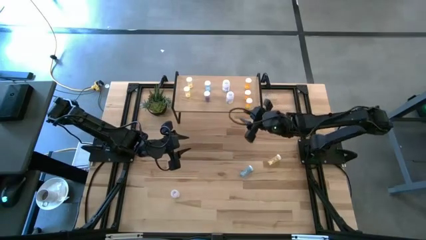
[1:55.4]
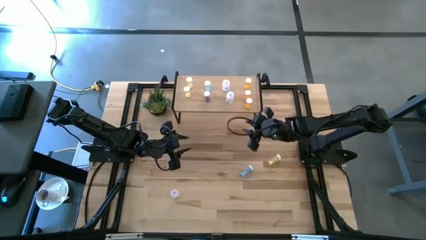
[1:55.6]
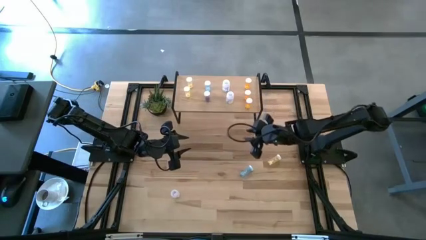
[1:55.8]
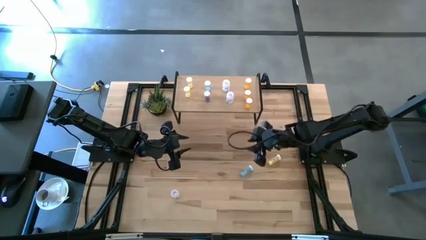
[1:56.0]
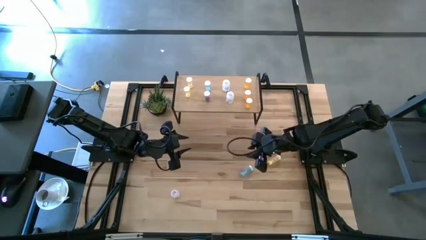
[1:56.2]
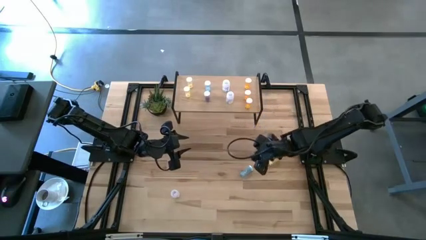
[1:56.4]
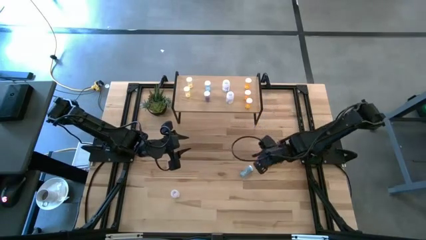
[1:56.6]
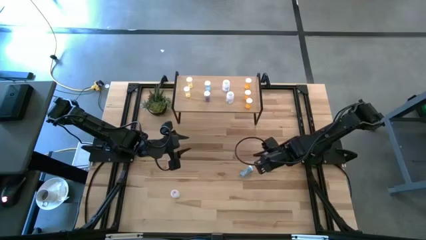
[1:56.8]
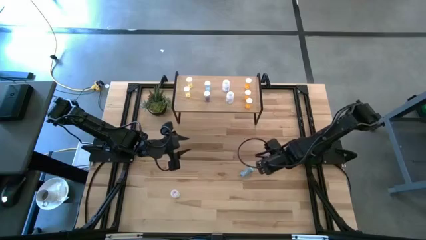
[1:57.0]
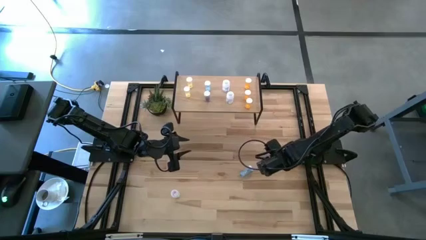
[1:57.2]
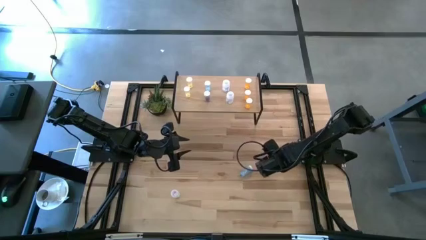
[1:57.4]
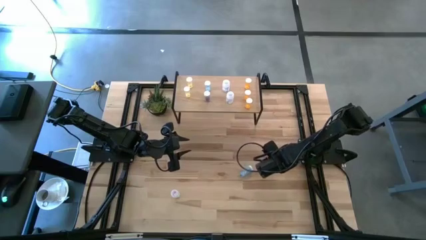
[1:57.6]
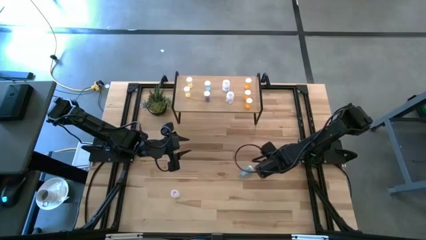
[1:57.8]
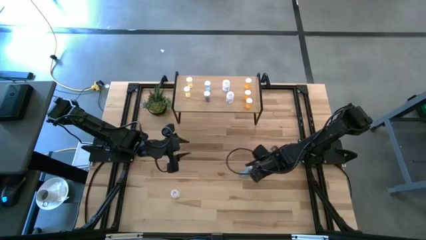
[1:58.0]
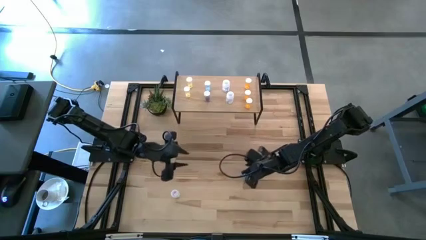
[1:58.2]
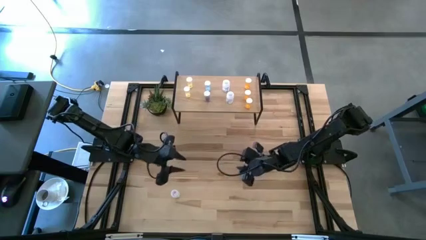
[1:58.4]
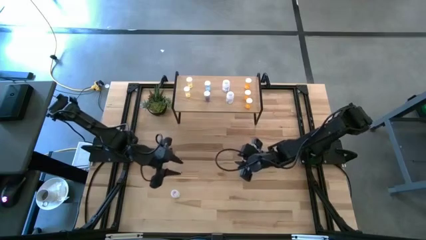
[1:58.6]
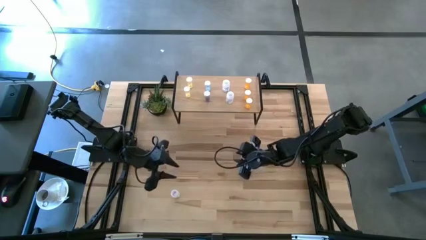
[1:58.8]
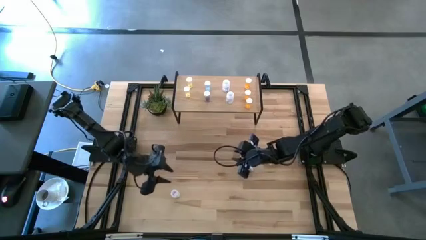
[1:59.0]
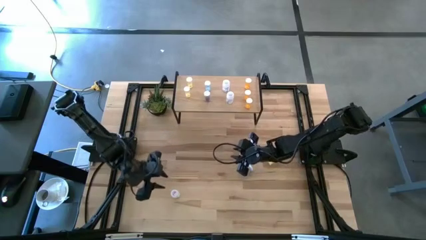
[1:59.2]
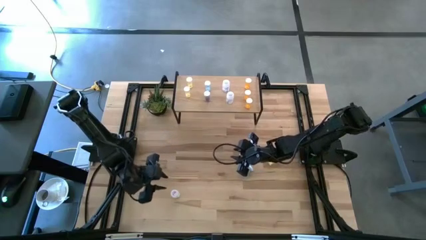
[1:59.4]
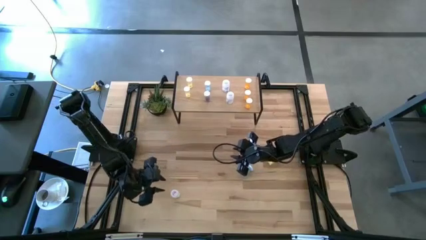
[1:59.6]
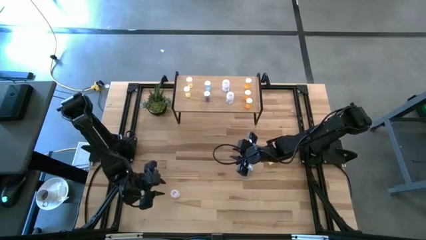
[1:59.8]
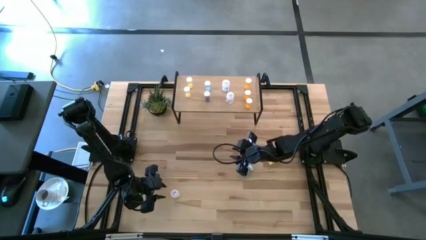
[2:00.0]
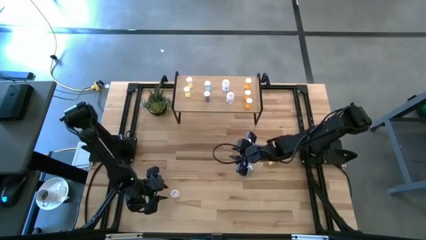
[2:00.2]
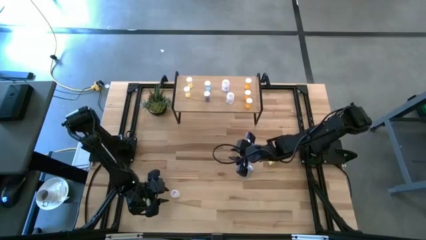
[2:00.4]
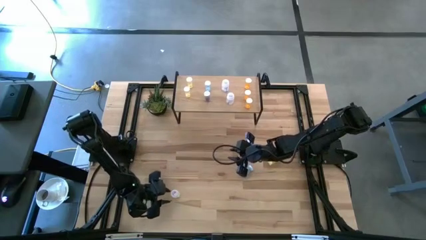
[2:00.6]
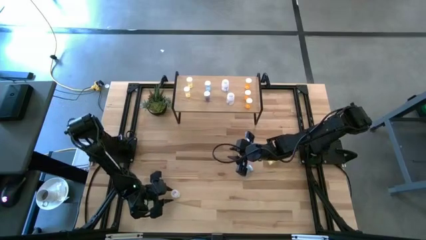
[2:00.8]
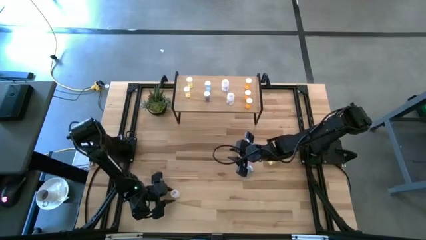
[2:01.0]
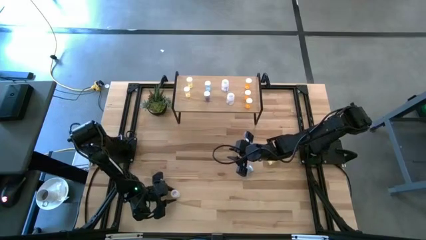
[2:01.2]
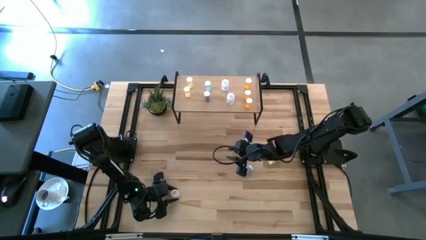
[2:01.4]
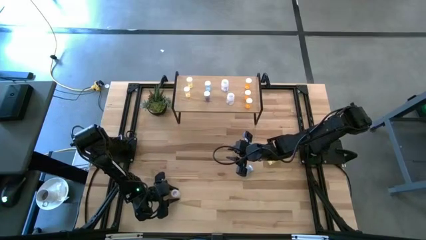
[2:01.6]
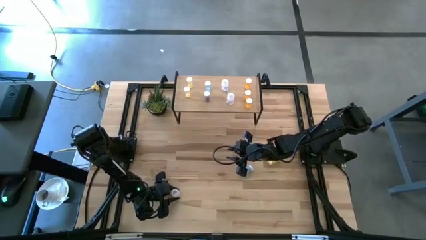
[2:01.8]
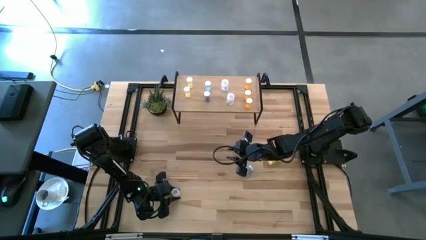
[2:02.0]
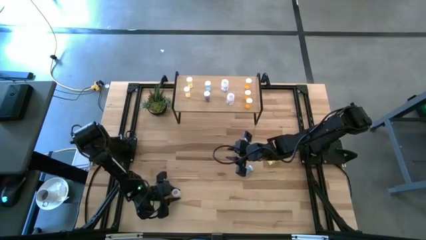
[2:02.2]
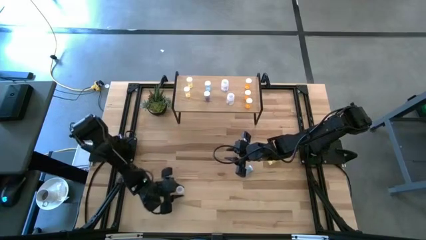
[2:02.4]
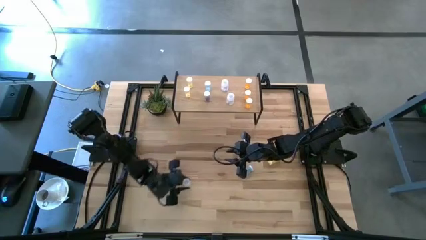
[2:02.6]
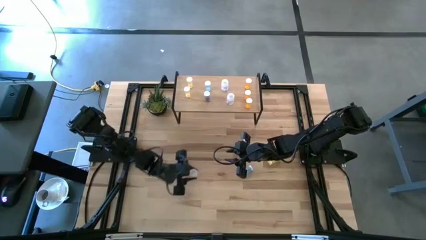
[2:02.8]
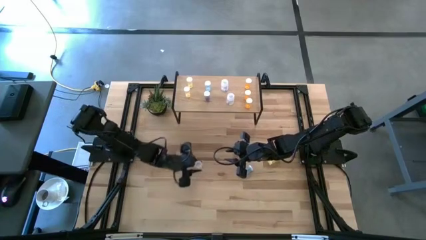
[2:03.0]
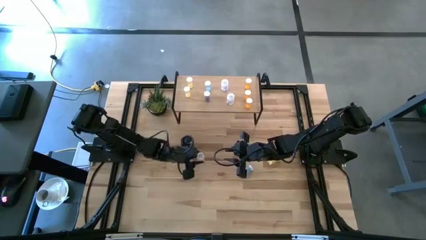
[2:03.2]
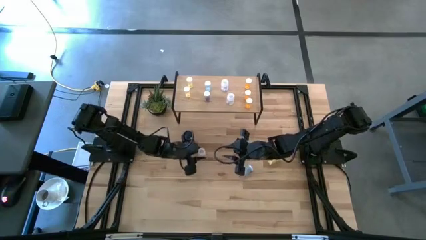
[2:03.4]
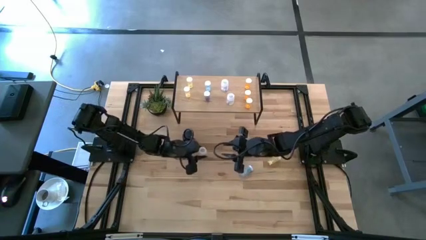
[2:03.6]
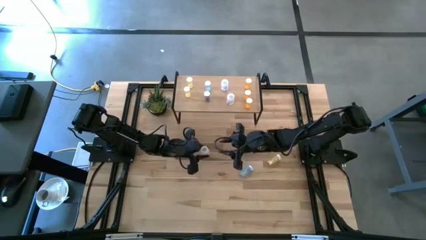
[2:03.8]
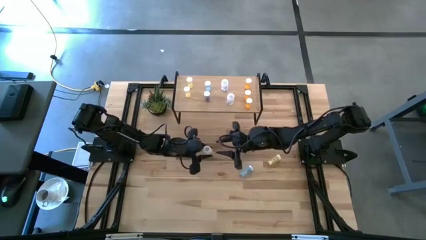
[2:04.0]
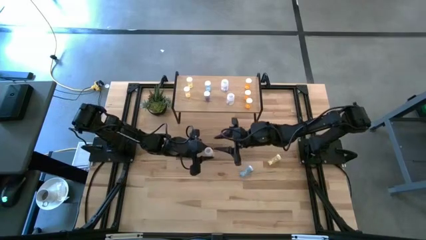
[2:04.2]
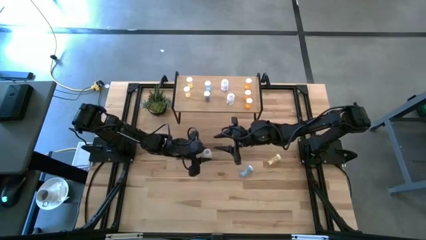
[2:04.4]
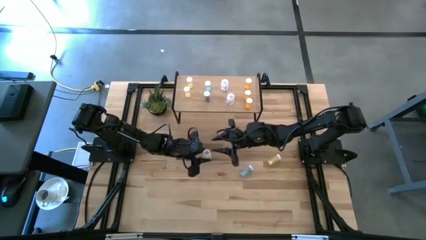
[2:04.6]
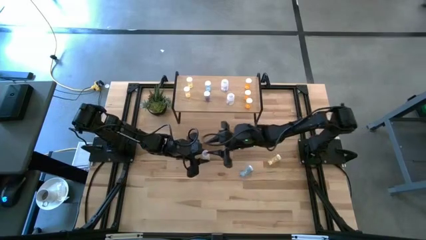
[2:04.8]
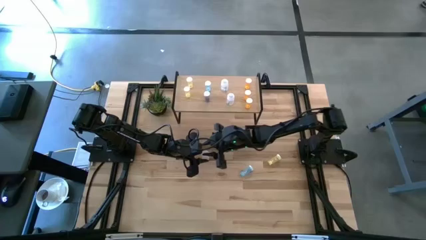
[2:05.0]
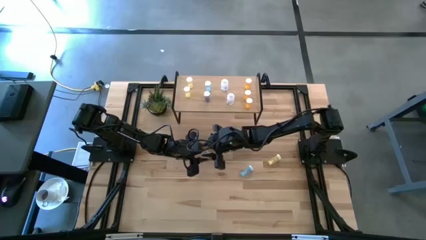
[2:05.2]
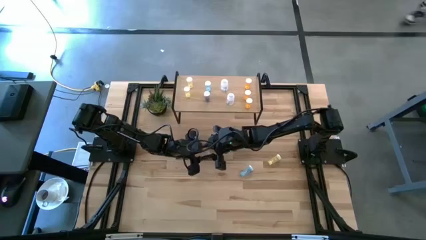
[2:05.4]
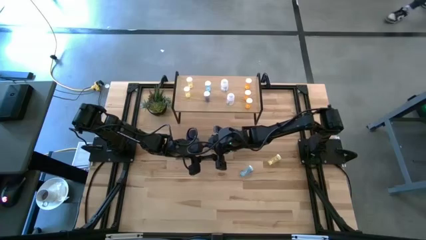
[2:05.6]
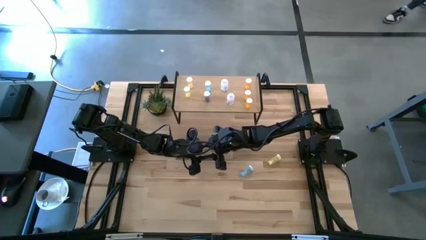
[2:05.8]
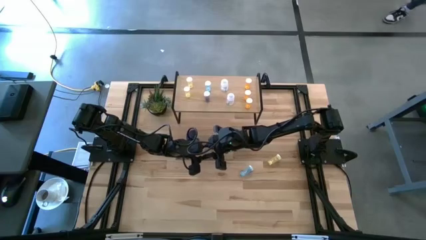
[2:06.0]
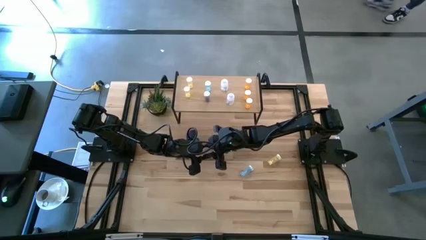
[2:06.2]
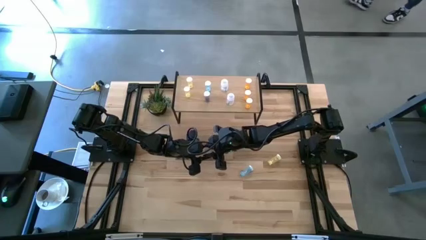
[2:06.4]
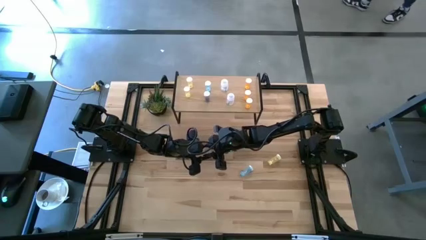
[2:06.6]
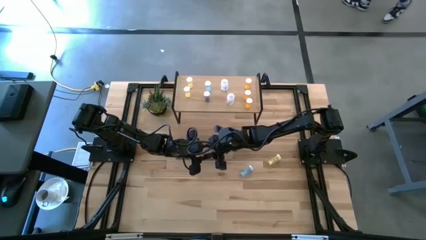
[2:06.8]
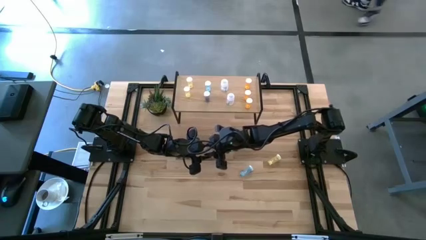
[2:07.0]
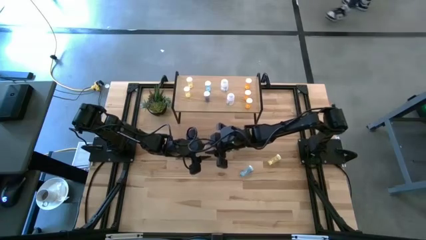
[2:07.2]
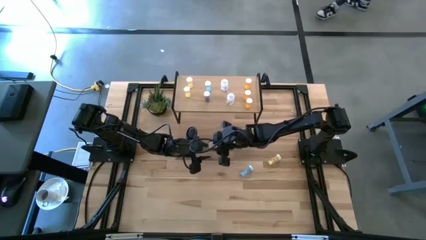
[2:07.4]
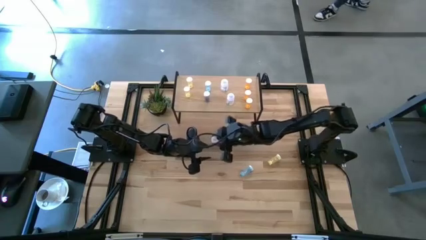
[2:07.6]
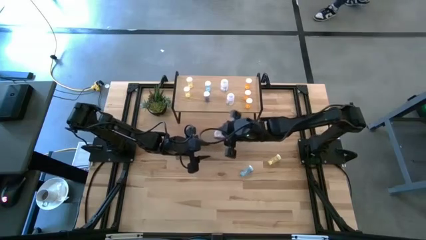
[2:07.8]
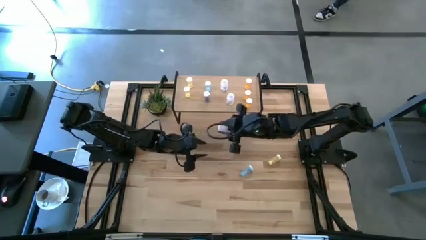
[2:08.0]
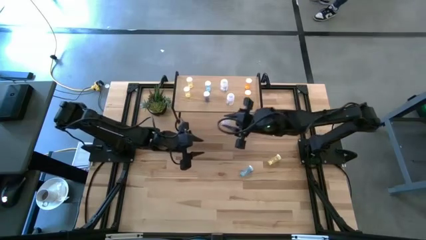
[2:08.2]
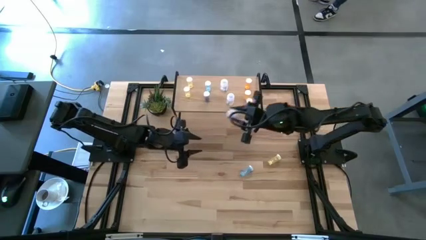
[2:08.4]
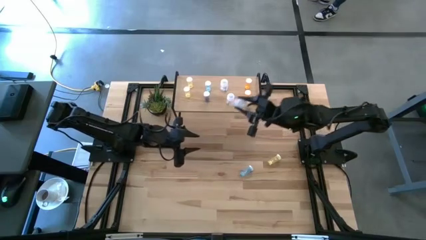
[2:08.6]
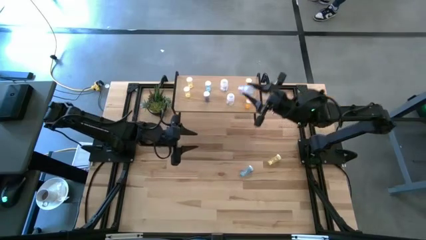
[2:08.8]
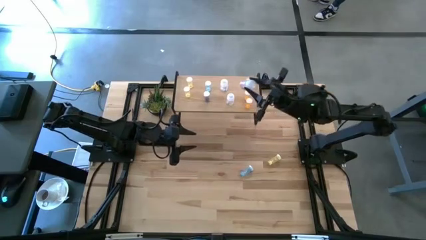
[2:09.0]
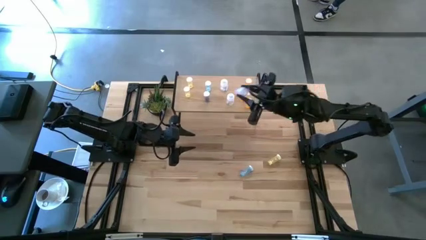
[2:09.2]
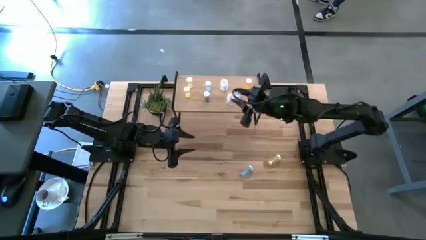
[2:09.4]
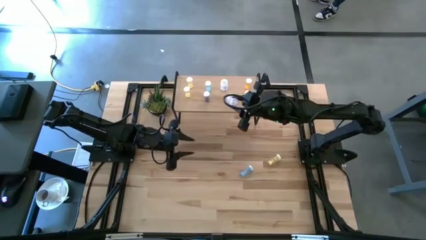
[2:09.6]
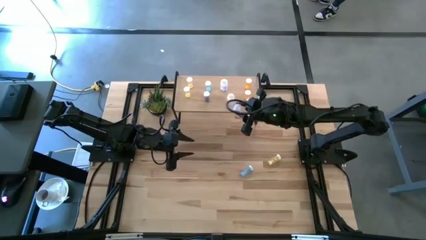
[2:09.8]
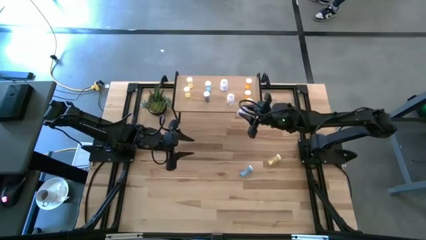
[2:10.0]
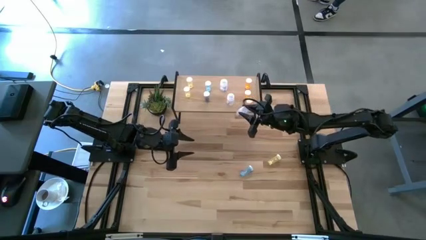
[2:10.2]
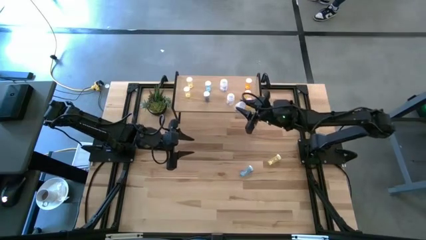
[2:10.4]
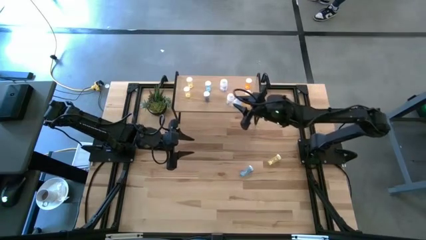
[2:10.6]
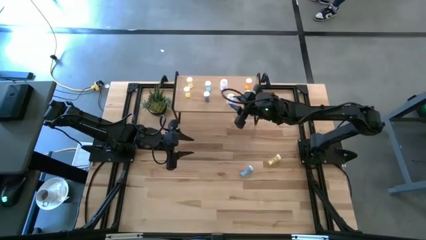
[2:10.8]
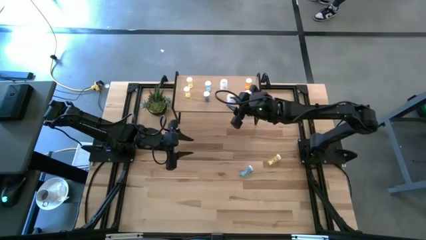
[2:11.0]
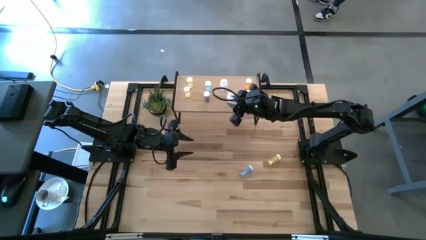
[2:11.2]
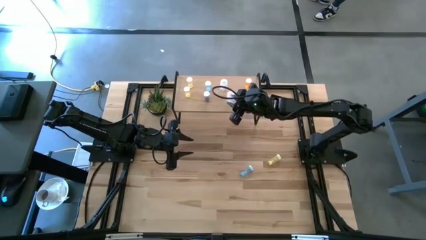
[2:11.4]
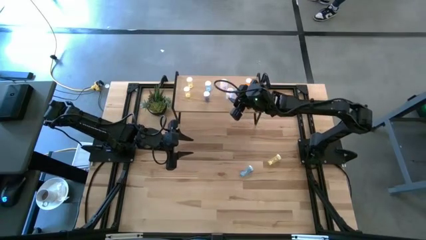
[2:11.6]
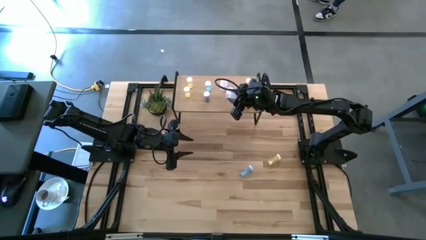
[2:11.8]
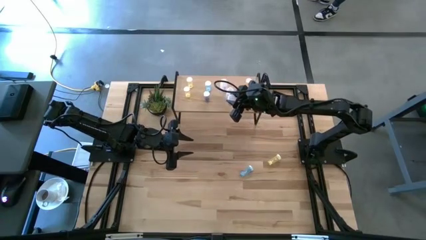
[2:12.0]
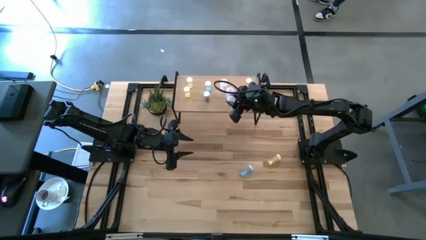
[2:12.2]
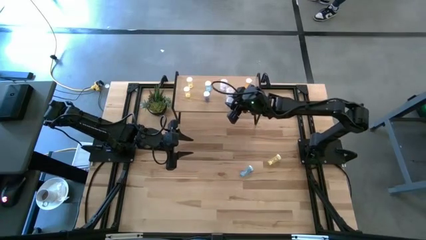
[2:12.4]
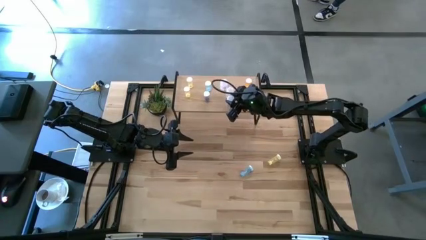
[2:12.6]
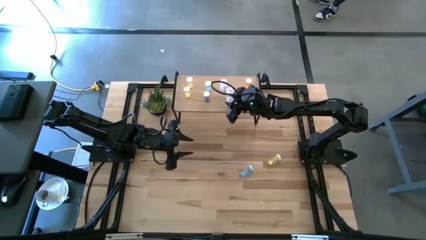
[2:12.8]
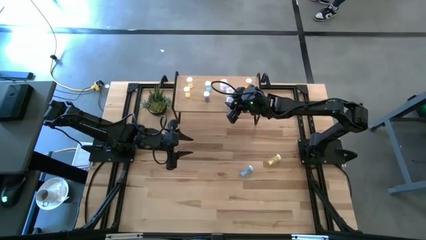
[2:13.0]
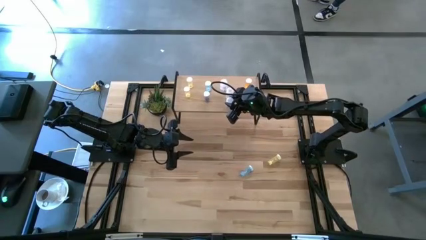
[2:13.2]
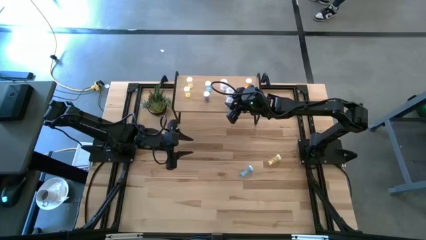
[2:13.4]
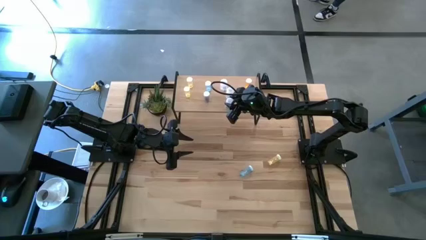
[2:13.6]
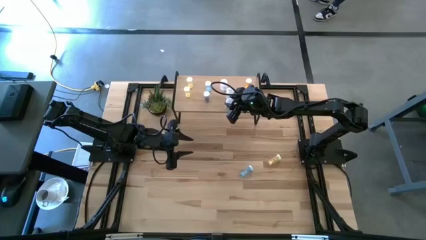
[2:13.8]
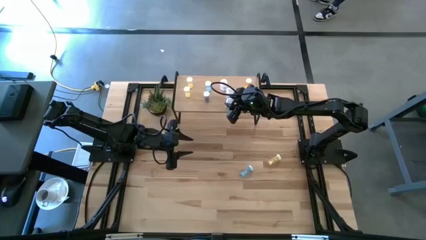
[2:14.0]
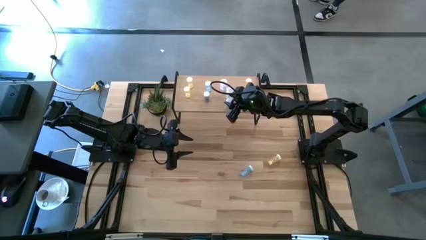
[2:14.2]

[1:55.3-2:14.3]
Task: Pick and place medicine bottles onto shelf by color
Put the transparent pill bottle on the shelf
